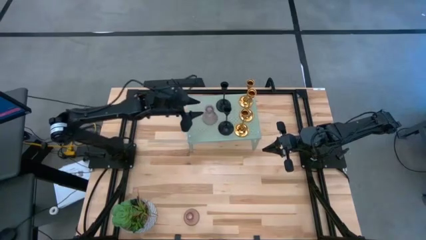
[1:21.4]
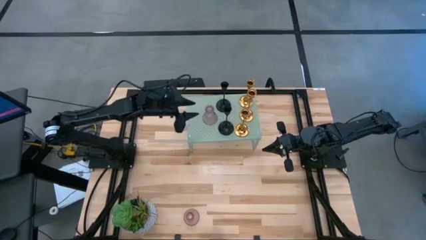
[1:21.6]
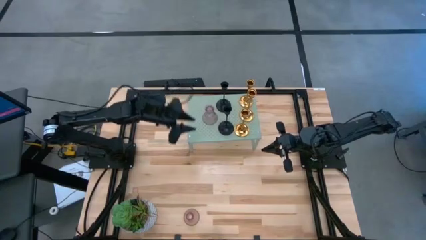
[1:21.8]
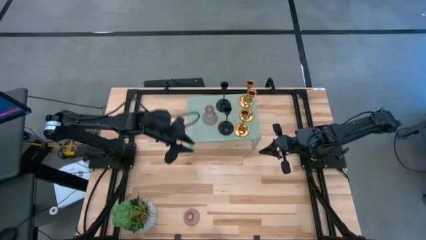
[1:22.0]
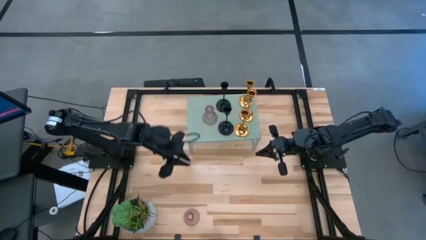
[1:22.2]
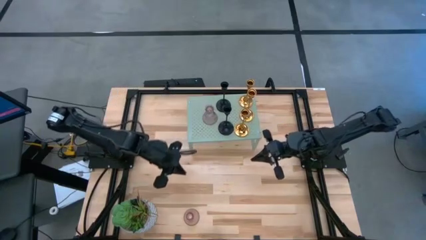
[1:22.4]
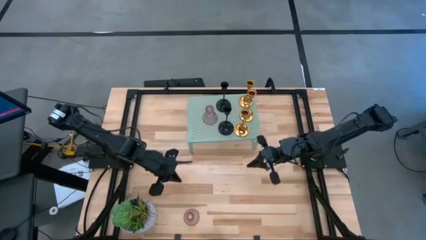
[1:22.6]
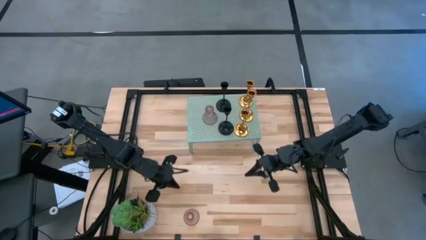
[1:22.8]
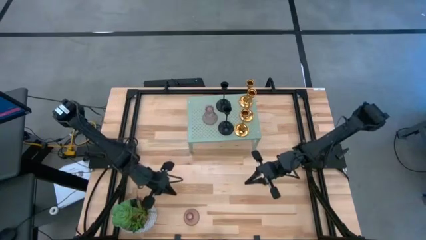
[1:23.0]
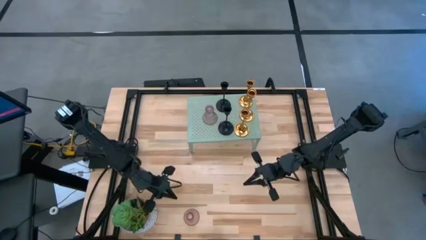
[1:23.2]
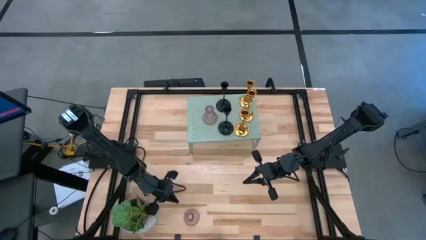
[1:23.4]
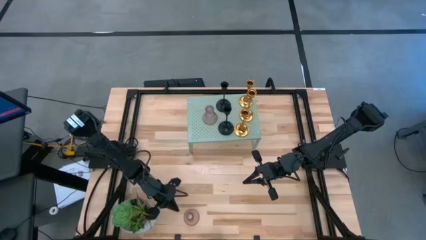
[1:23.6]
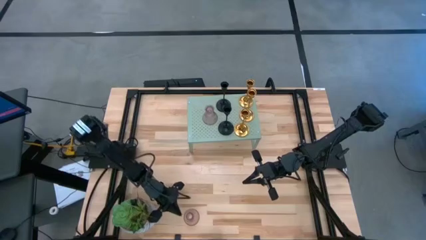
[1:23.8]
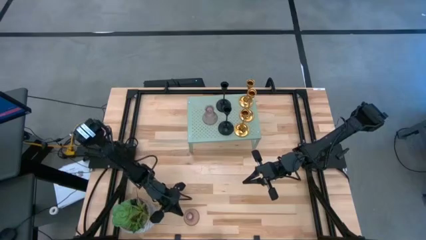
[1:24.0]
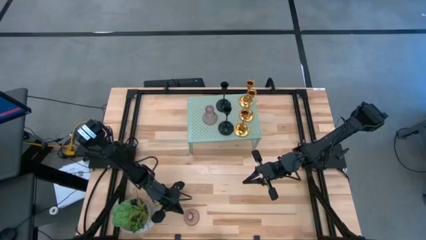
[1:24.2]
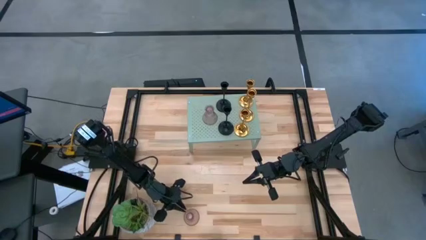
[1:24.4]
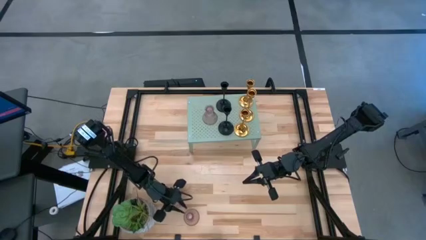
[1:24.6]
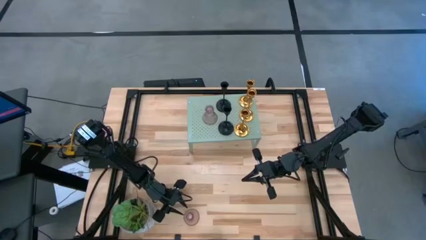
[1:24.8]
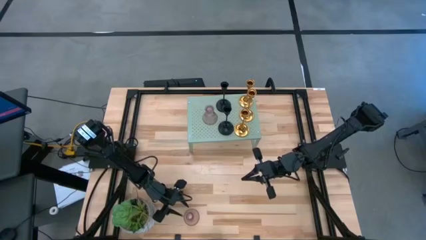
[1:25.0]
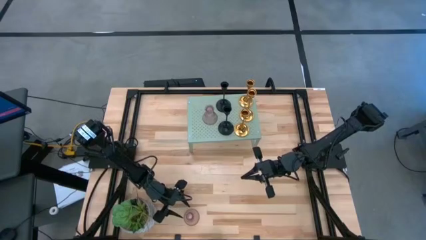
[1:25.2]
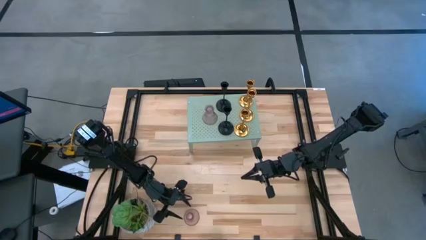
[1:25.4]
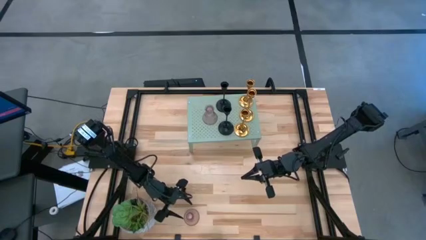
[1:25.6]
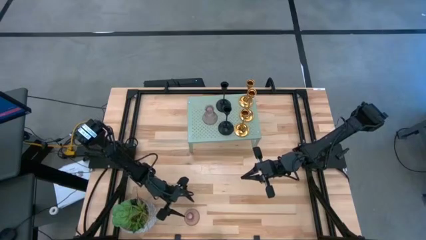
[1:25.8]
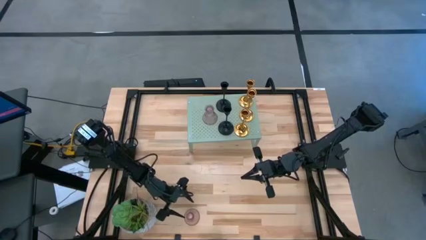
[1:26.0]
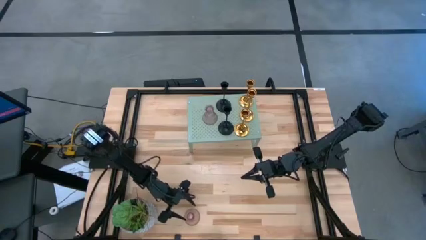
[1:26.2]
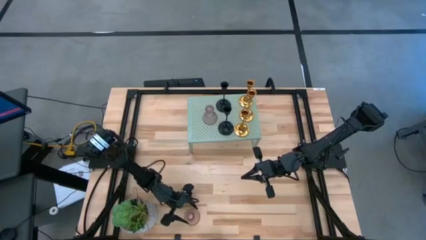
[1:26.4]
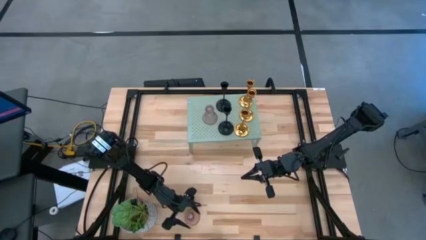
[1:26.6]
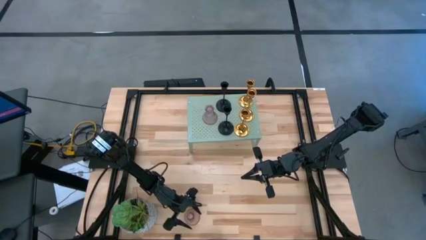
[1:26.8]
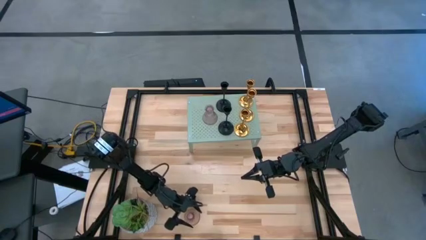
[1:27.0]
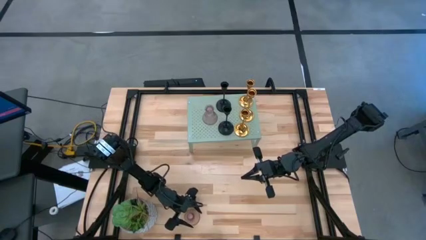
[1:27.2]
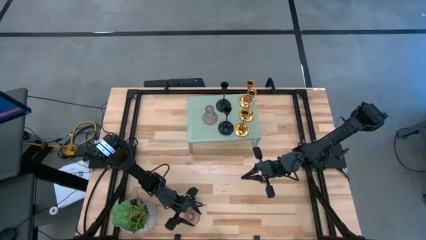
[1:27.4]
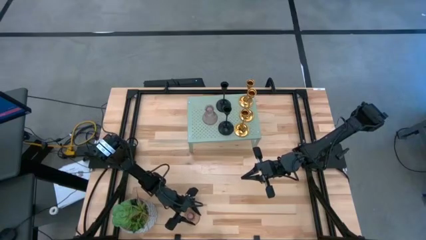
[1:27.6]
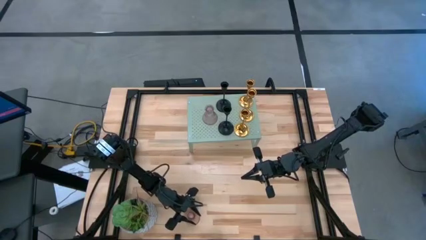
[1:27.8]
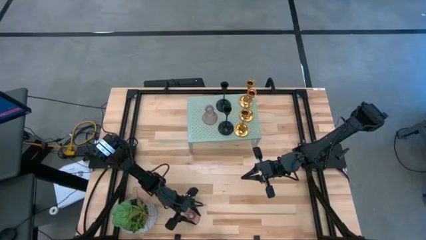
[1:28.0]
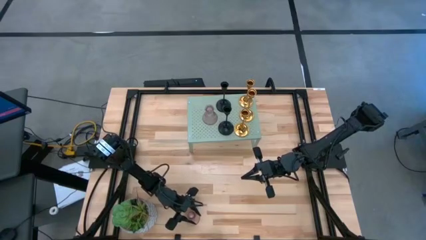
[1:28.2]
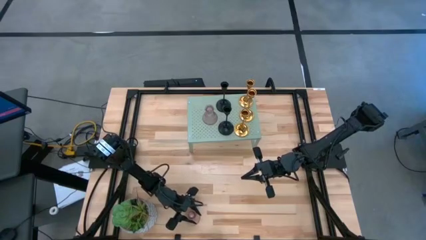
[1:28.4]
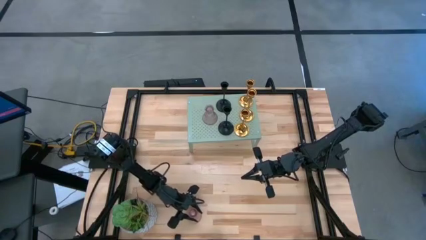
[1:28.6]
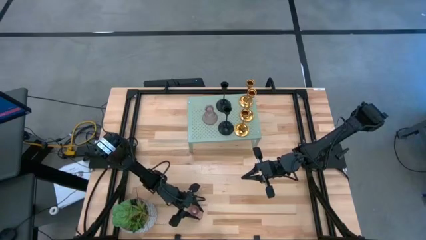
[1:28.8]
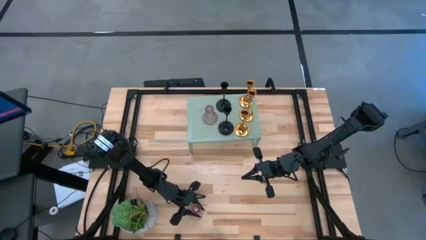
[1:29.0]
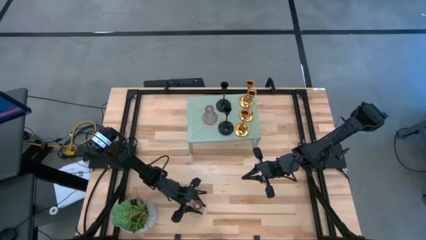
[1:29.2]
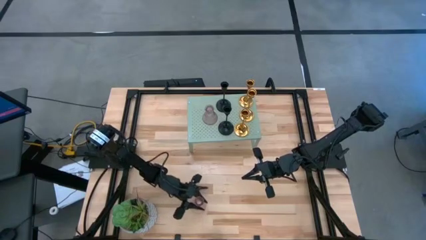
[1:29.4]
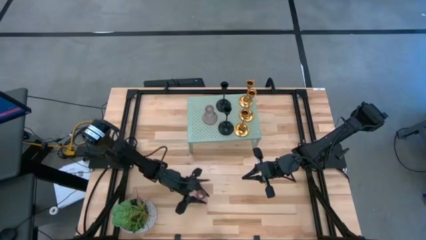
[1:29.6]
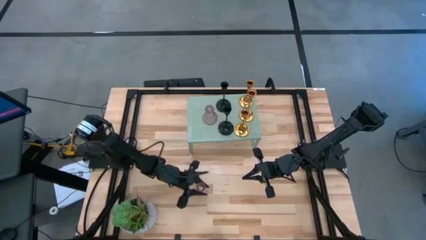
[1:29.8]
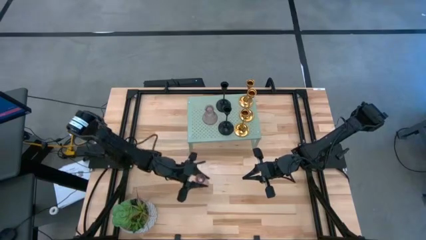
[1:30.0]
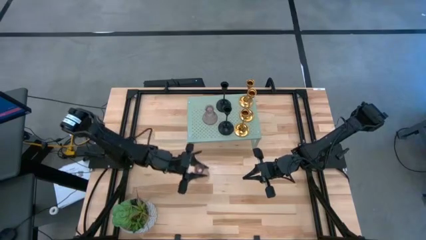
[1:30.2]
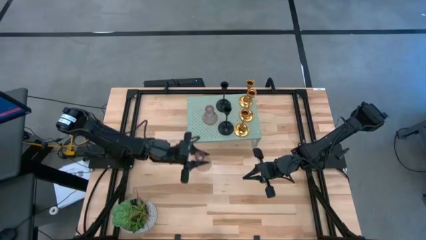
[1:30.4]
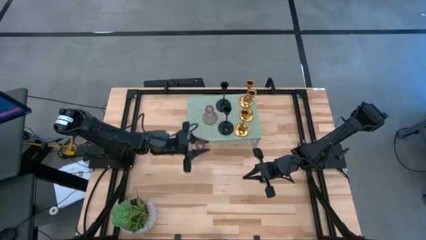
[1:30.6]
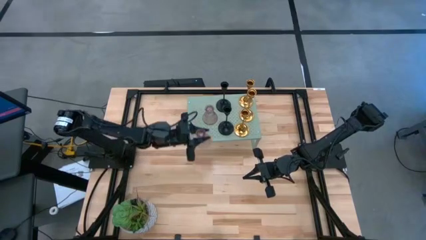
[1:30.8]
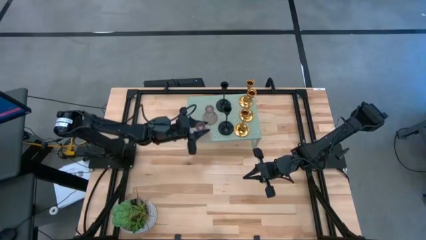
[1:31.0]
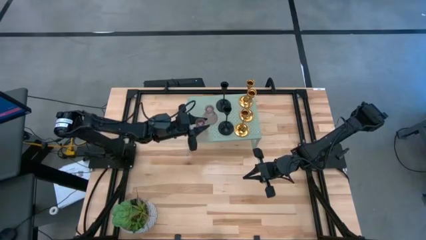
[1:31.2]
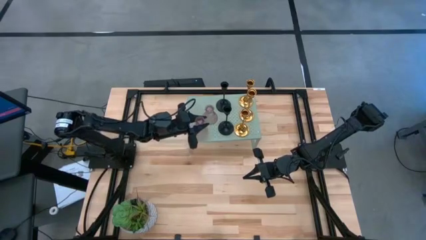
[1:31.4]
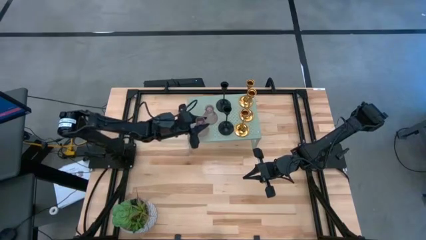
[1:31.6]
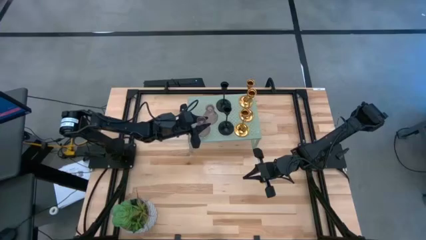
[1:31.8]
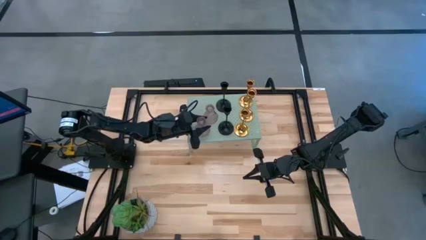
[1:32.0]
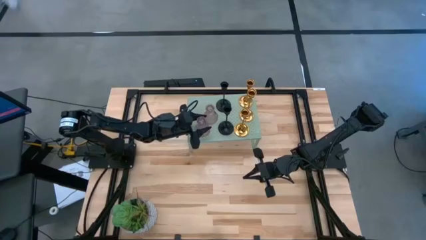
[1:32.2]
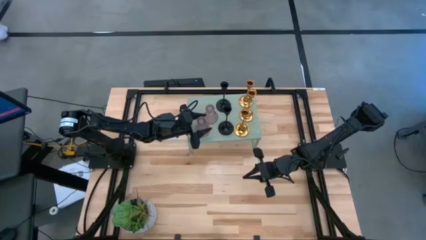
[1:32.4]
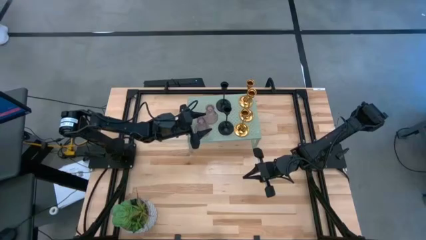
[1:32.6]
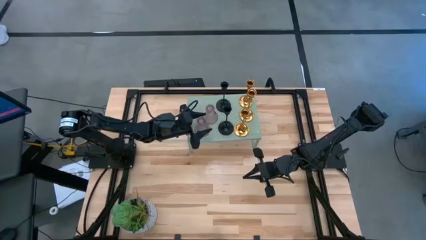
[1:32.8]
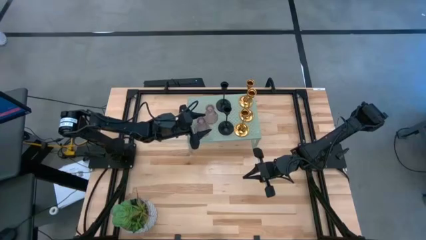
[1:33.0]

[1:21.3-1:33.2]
Task: Pick & Place candle stick holders
Put the pink glass candle holder on the shelf aligned with the other pink glass candle holder

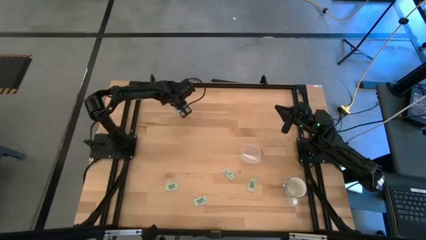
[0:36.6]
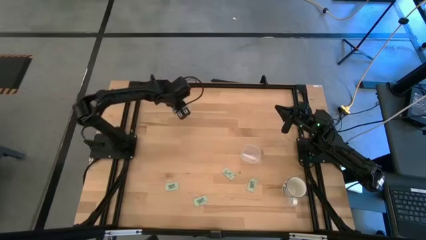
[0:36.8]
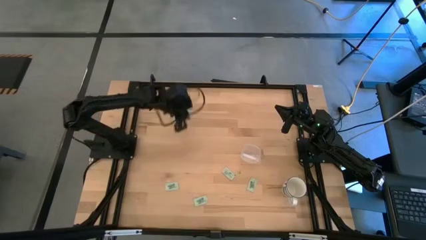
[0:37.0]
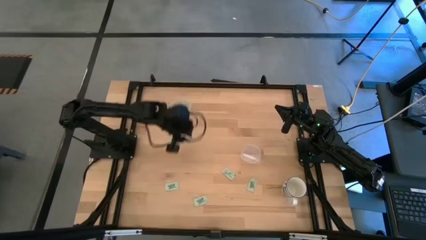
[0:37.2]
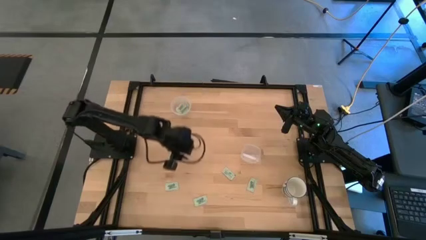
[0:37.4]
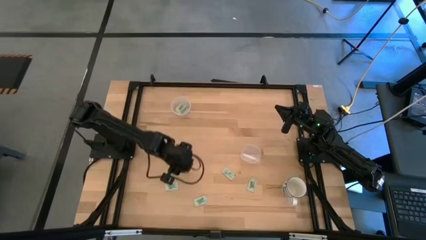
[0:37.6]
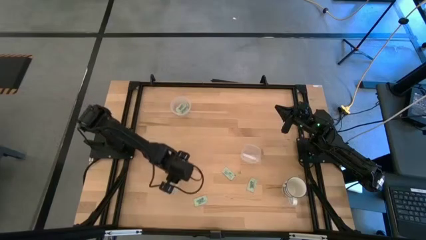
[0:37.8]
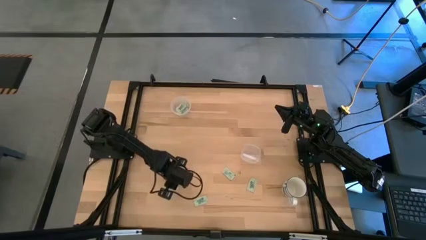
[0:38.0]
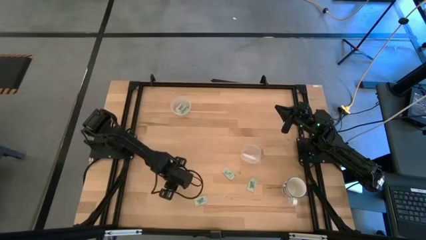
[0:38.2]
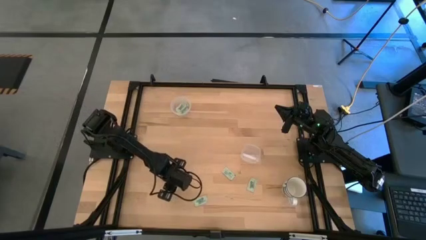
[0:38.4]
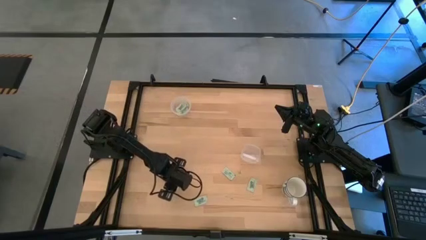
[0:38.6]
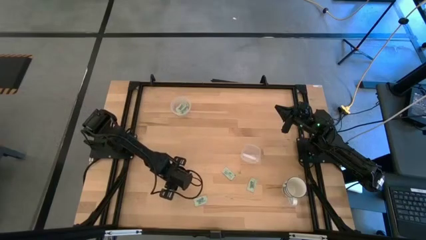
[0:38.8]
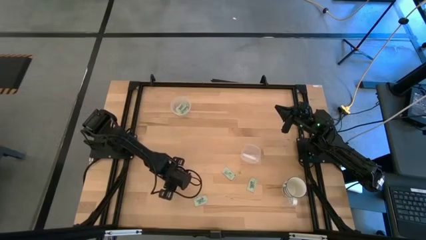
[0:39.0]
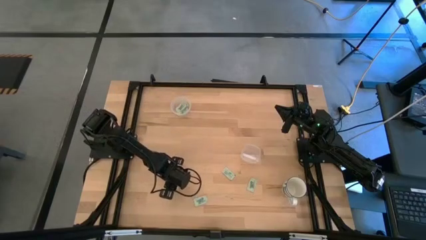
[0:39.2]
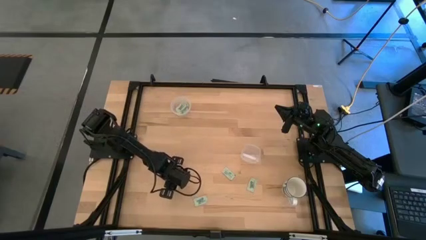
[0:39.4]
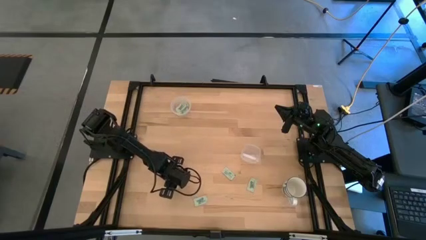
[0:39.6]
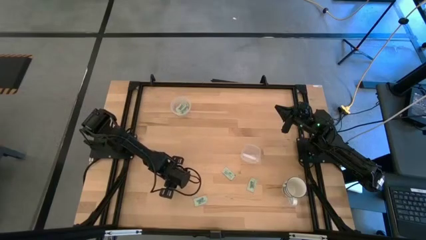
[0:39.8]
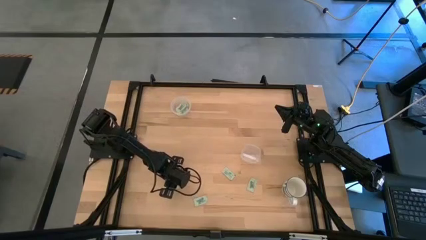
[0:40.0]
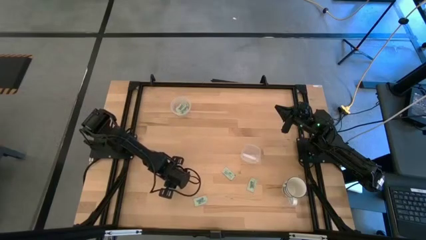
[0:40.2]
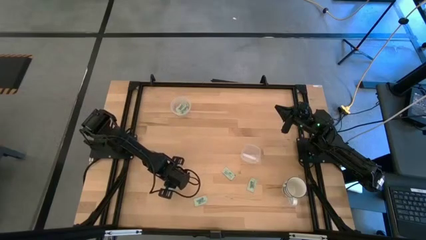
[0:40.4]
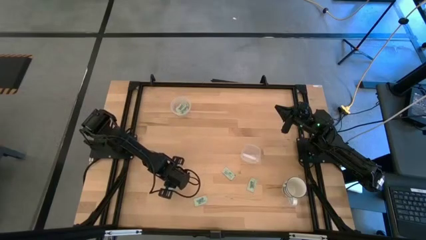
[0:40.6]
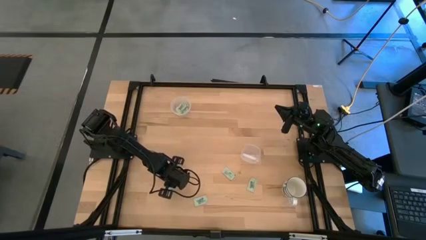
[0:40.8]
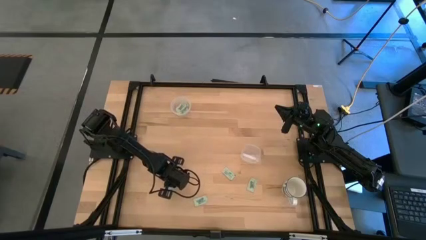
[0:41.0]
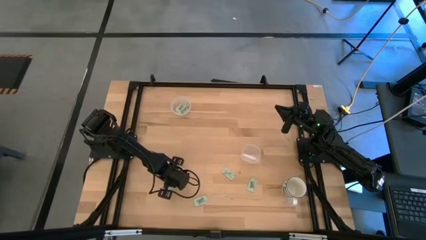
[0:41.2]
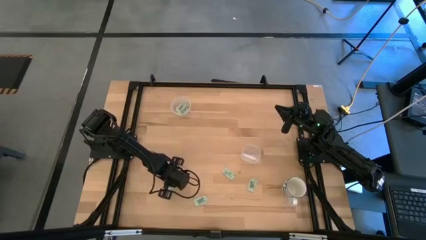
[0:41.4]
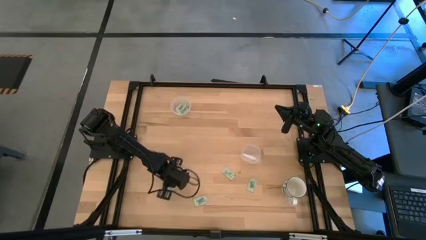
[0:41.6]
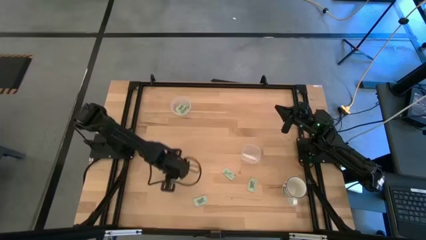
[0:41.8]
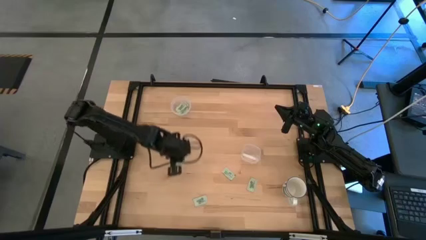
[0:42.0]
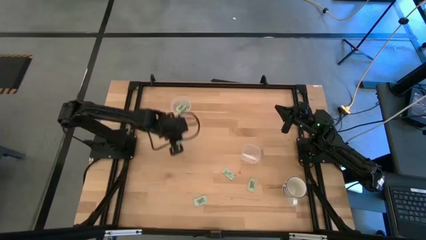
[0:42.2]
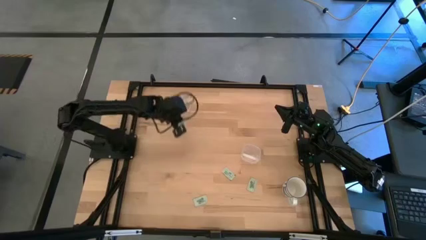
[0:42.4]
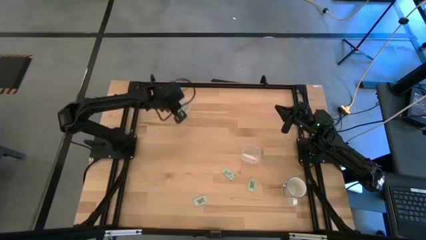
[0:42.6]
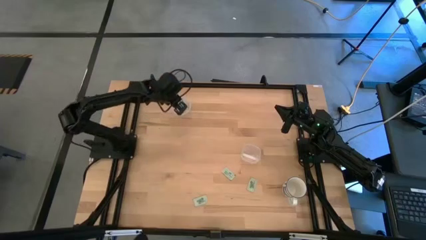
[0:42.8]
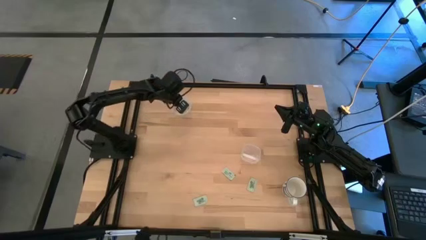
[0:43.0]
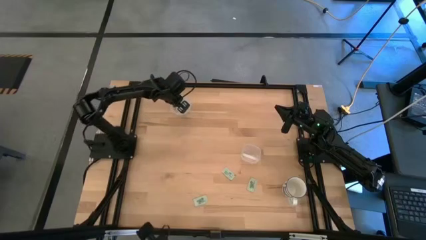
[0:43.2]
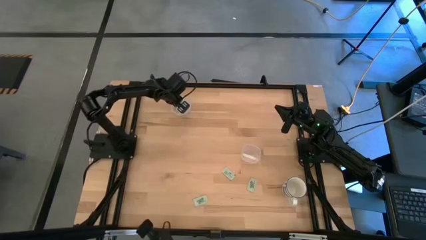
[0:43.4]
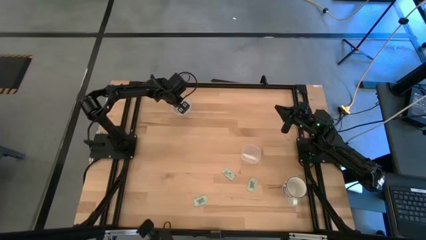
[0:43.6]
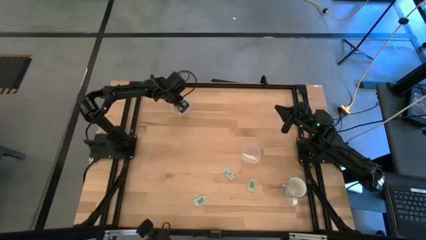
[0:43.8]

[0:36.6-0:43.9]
Task: Pick and place Stevia / Truvia into bins
Put the stevia packet into the top transparent container
